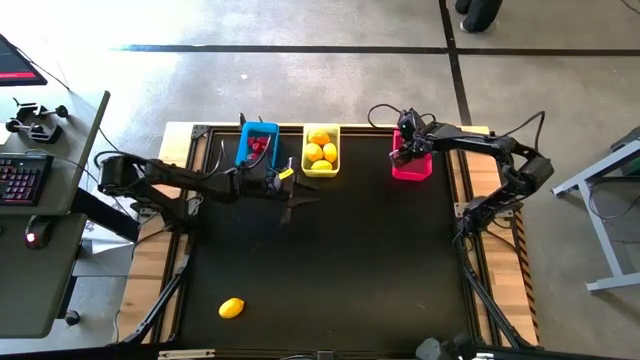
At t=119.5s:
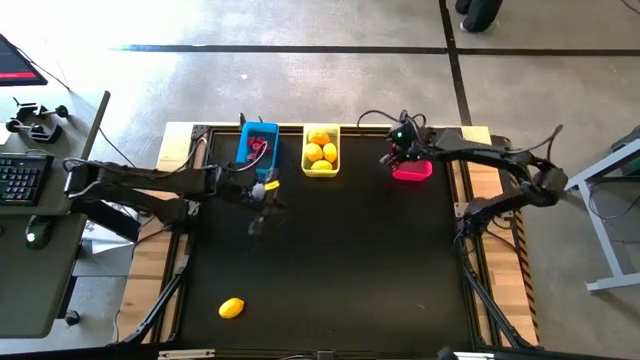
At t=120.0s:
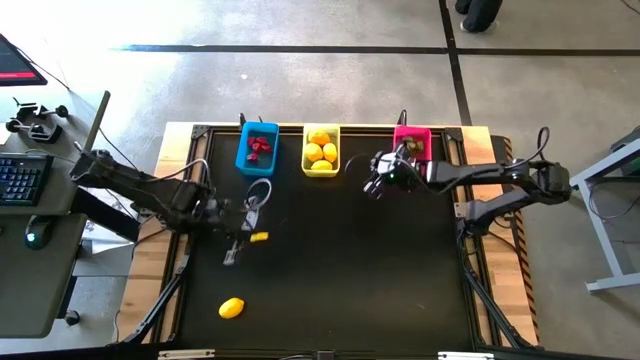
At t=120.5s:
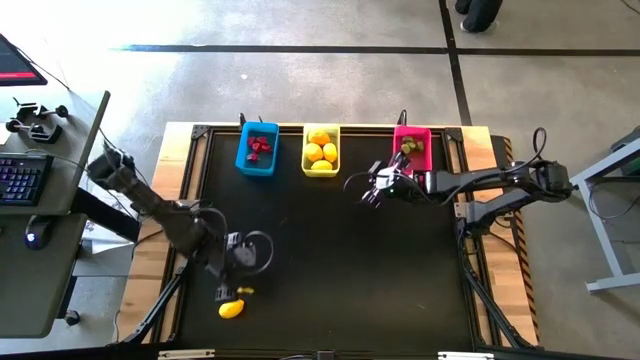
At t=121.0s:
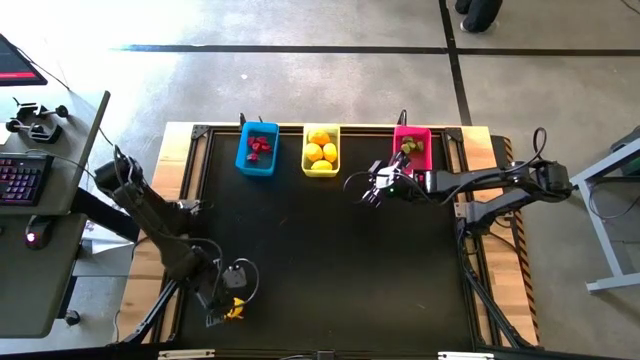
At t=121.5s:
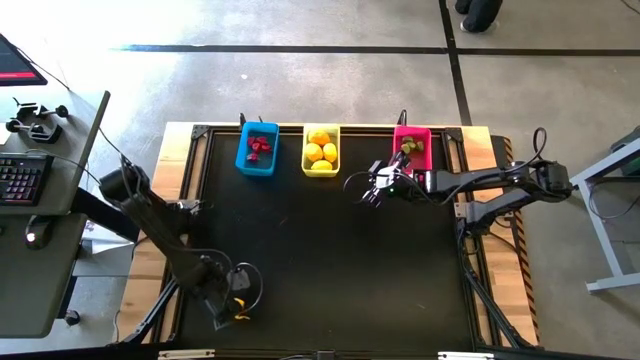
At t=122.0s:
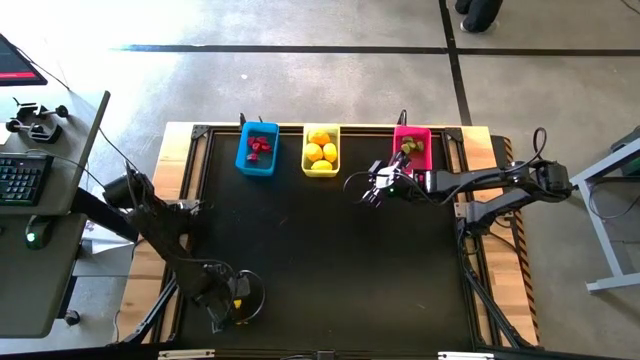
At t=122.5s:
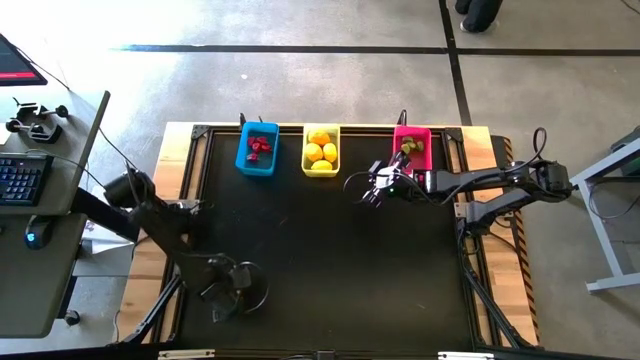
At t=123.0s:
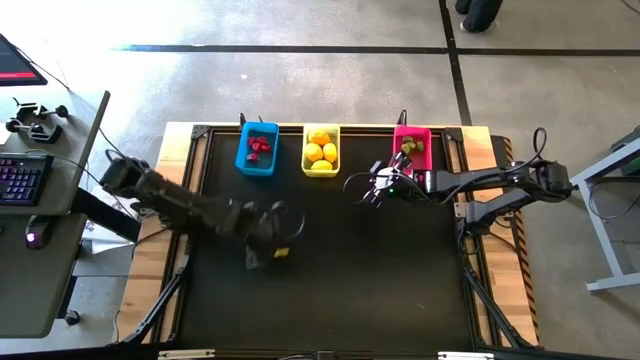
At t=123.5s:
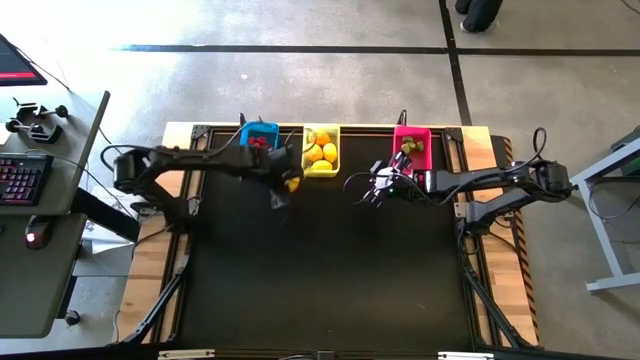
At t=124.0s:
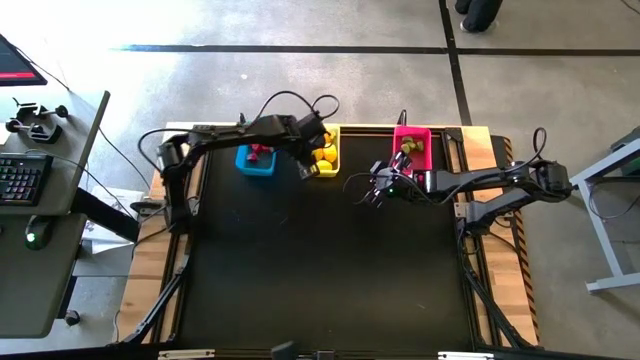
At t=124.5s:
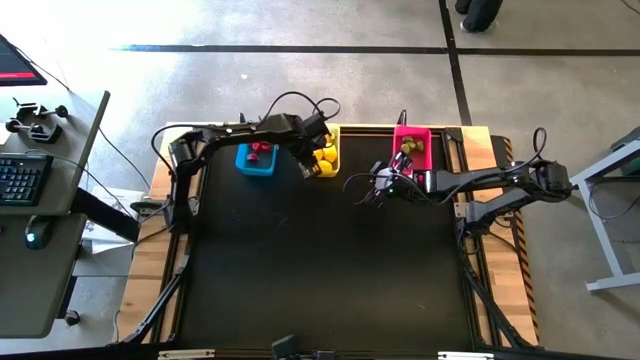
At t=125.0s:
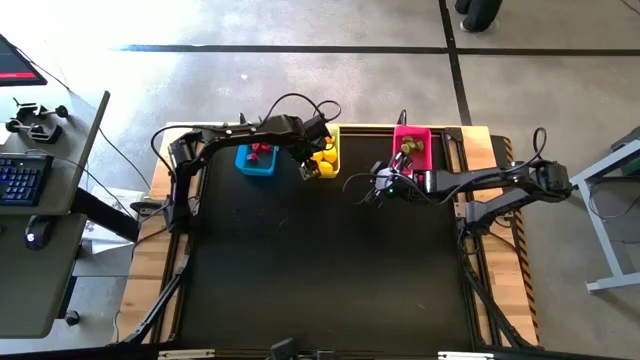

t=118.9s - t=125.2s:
Task: Sort produce into baskets
Put the yellow lemon into the yellow bin

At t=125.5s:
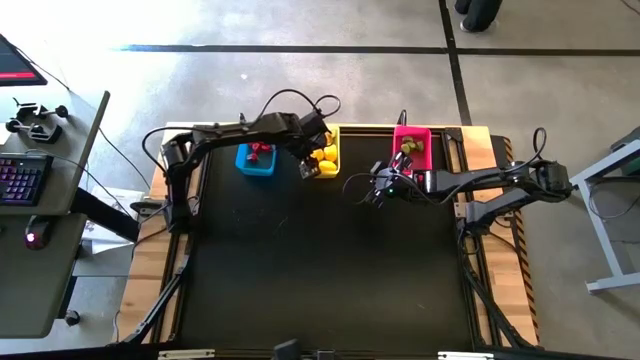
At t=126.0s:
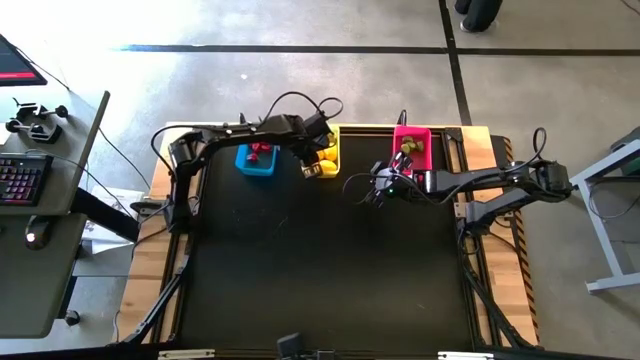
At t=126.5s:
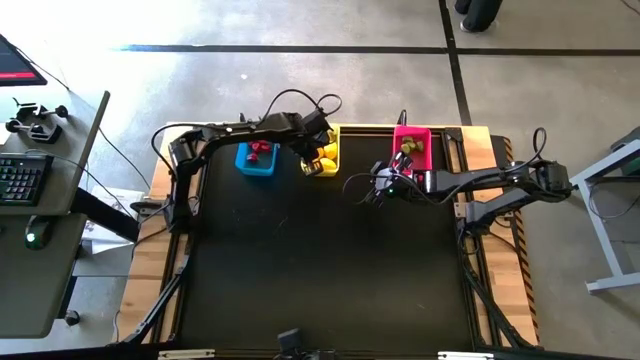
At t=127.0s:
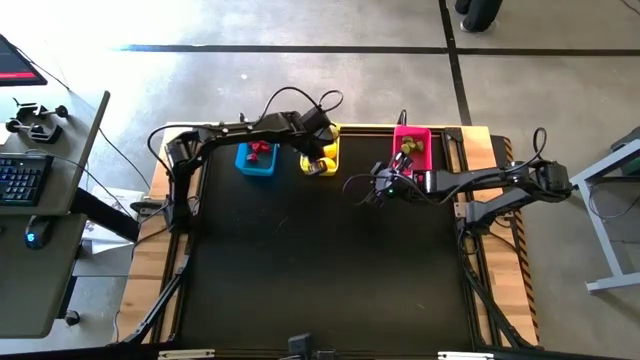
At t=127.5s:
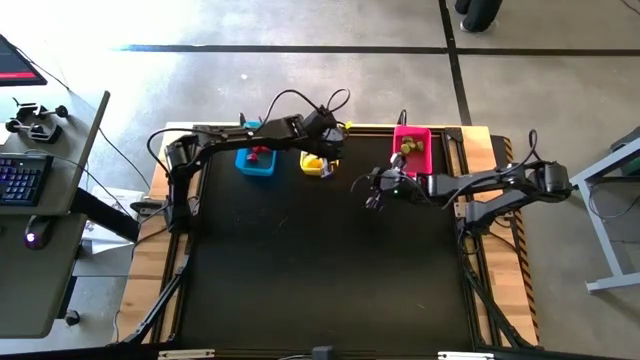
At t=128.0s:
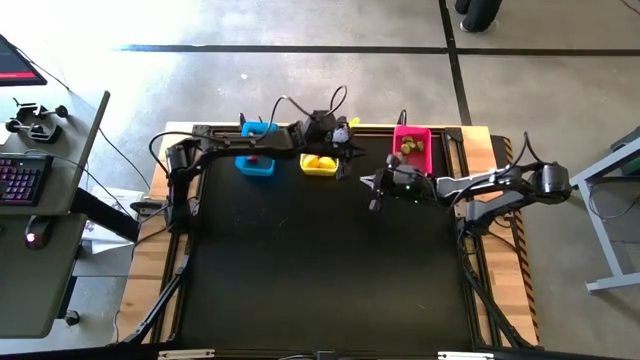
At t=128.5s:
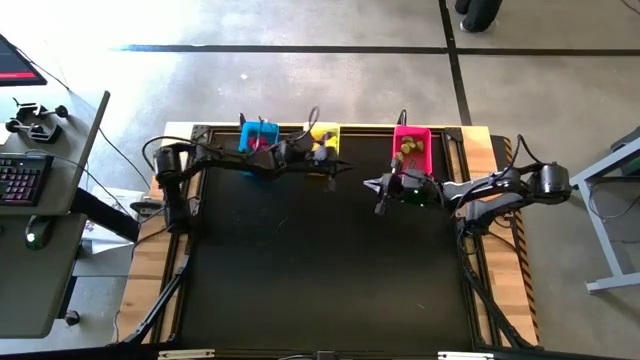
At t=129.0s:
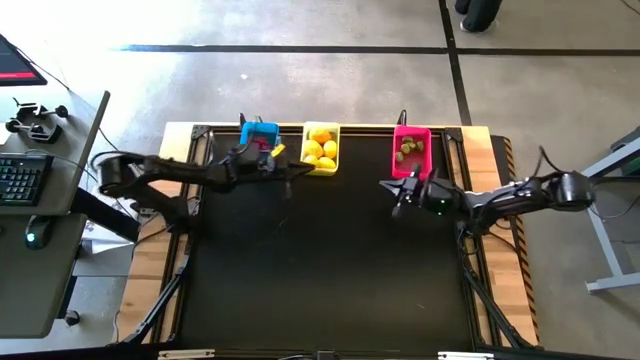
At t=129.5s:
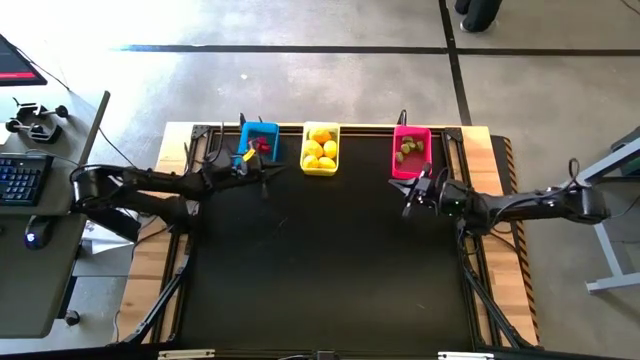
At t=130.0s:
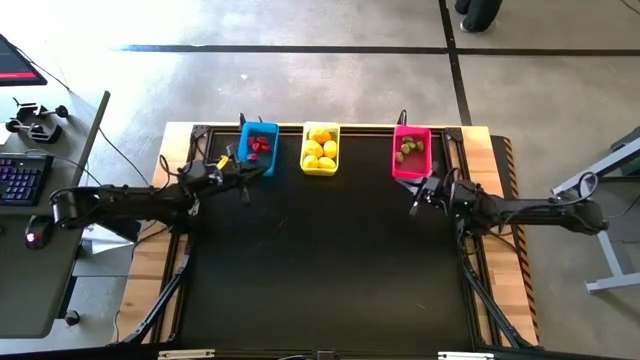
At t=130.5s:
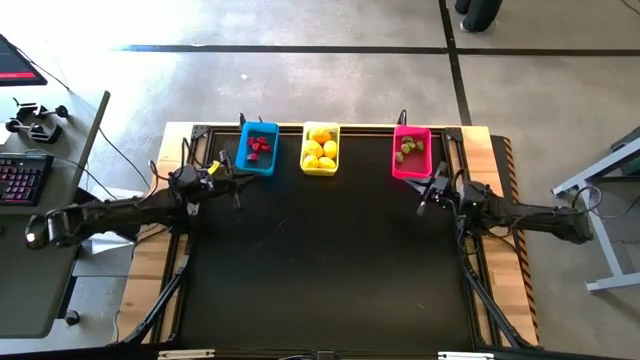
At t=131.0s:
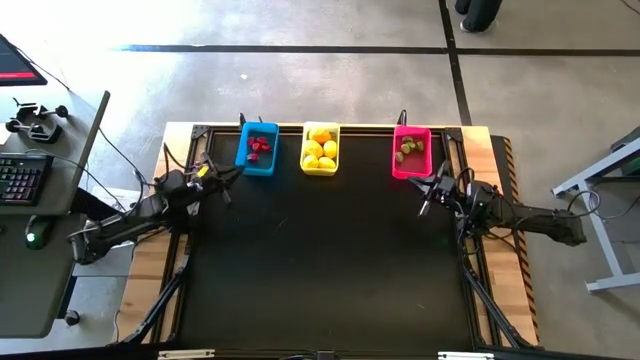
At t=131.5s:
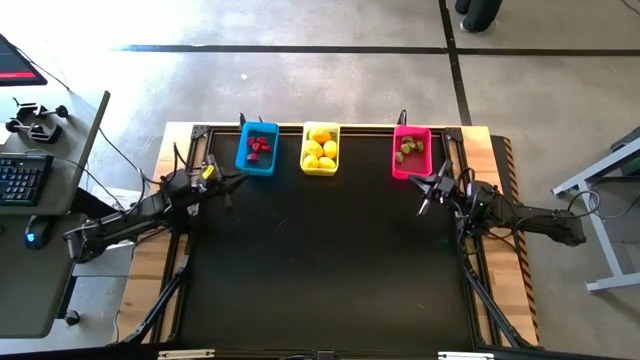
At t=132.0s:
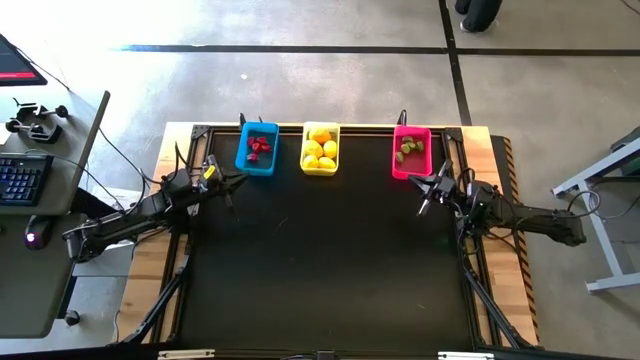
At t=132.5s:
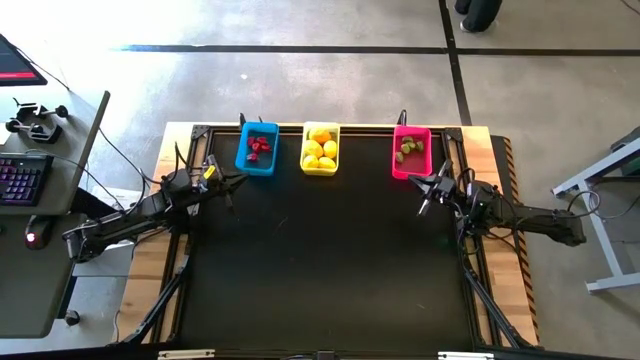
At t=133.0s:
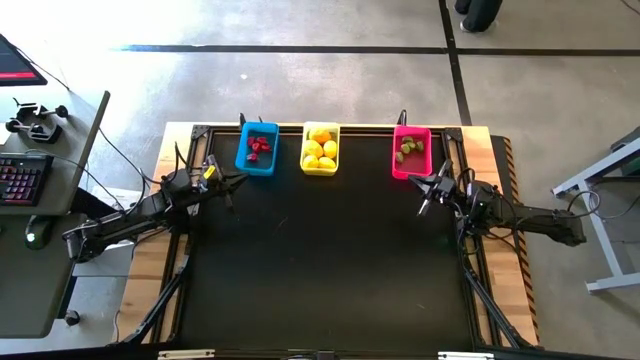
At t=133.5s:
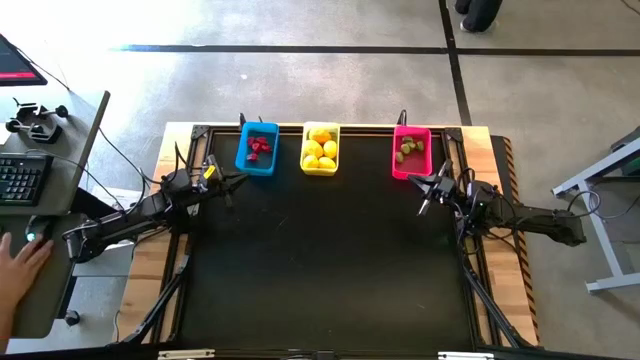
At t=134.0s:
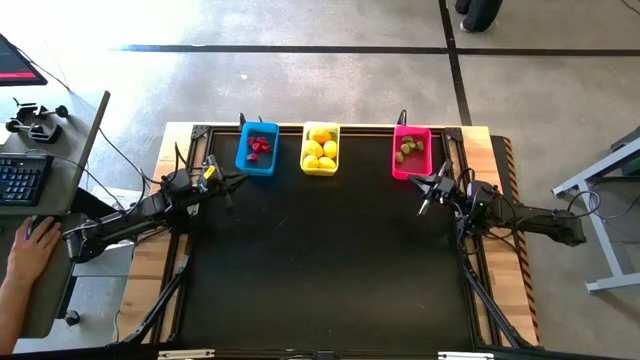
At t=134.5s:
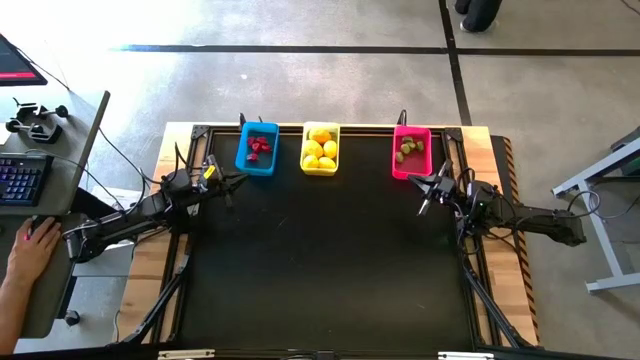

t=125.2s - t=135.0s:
Return to Home Position

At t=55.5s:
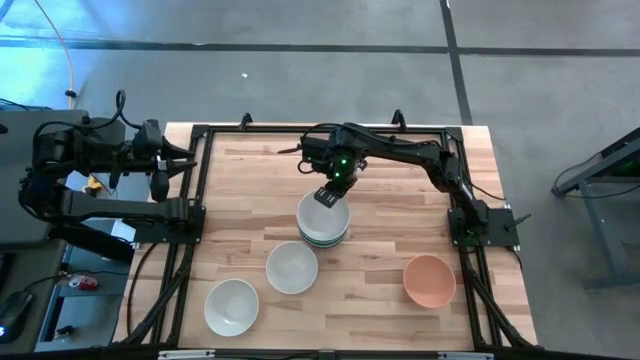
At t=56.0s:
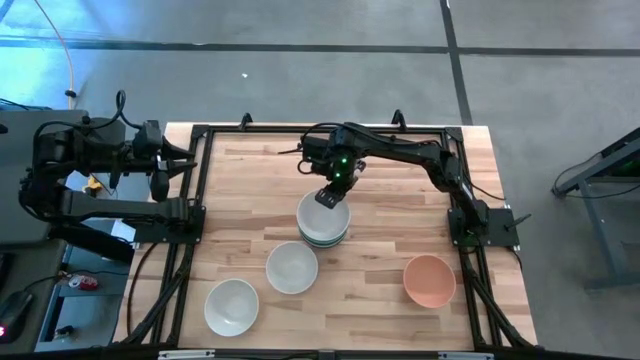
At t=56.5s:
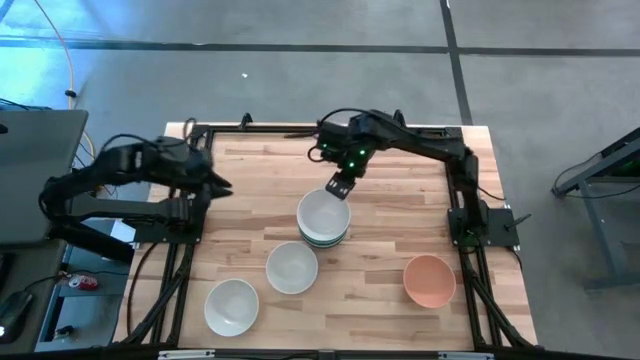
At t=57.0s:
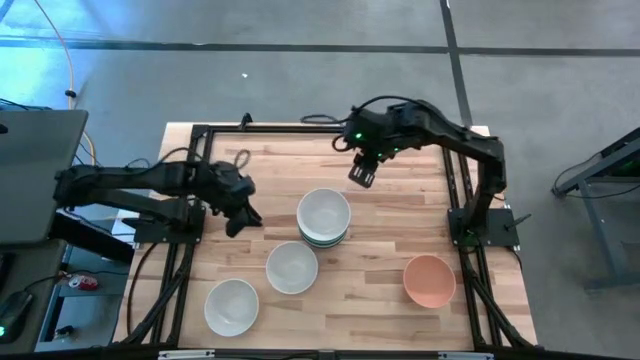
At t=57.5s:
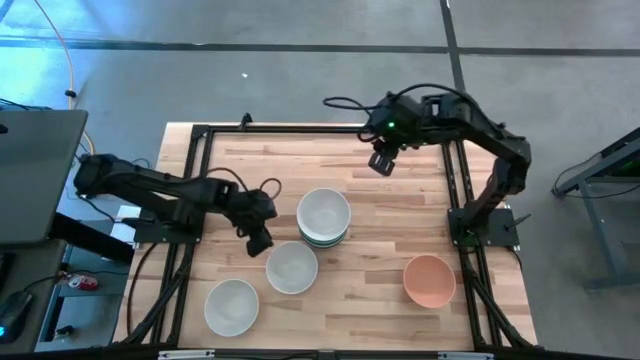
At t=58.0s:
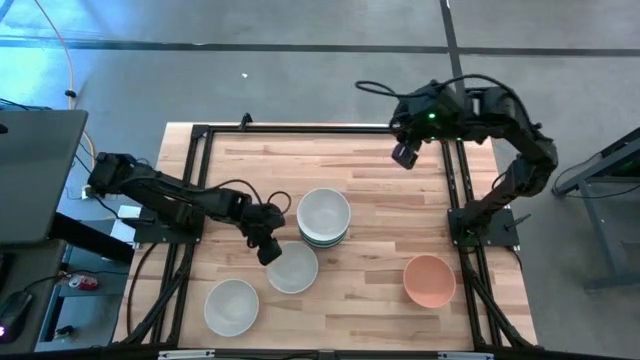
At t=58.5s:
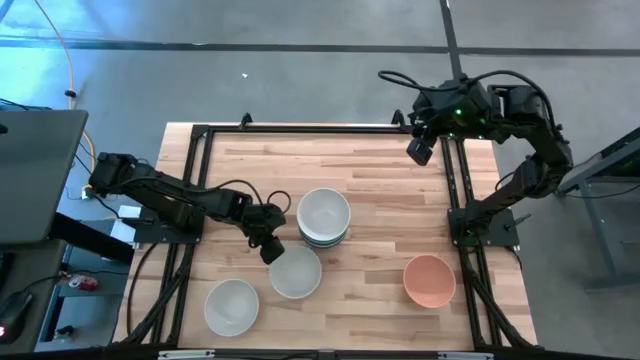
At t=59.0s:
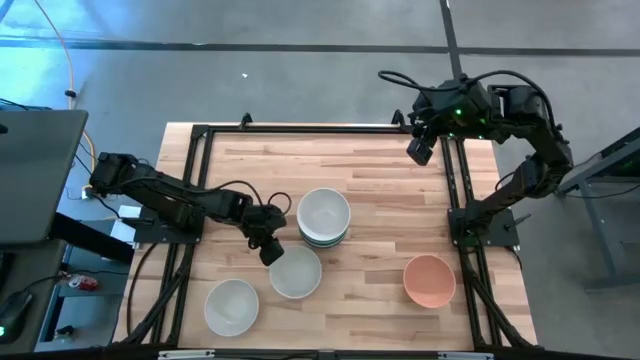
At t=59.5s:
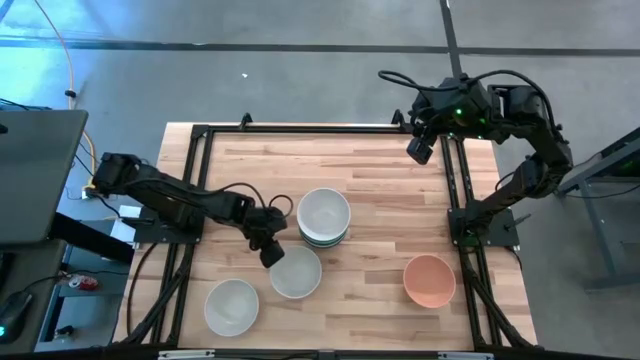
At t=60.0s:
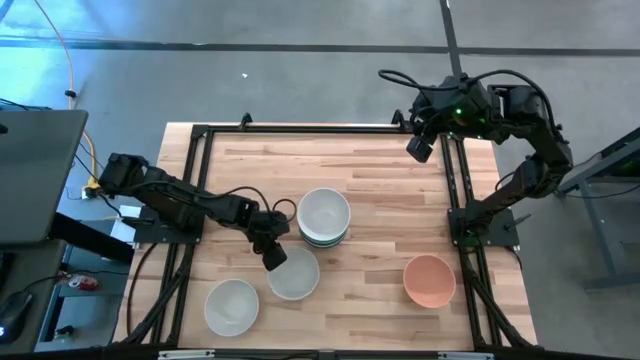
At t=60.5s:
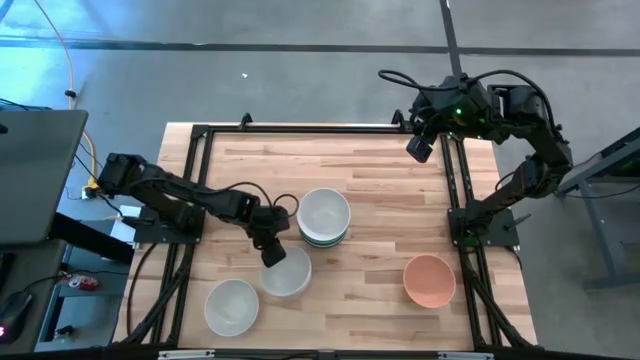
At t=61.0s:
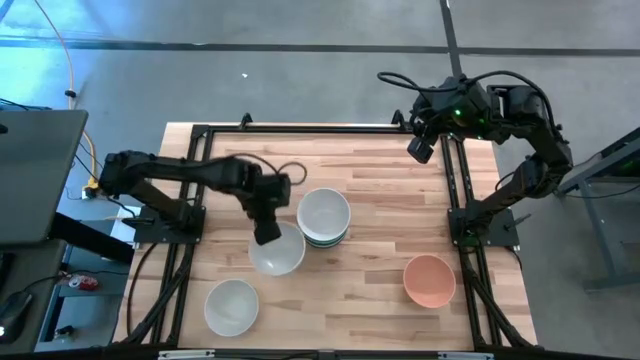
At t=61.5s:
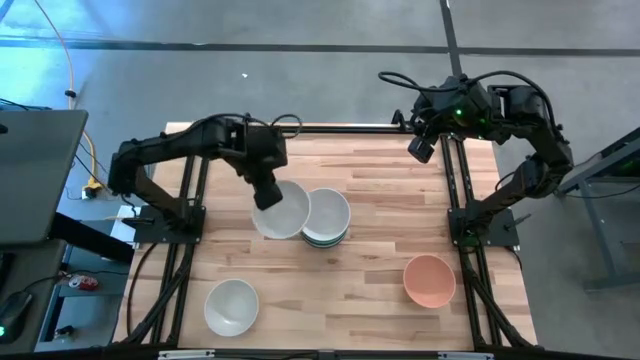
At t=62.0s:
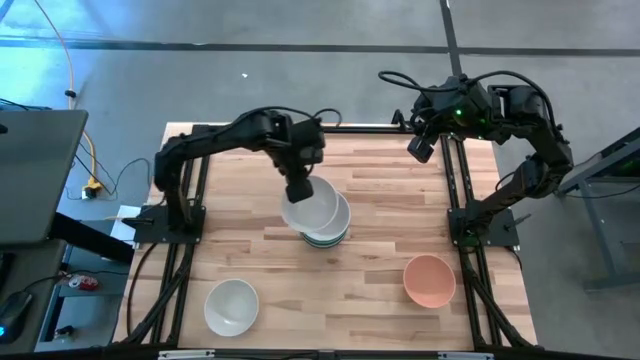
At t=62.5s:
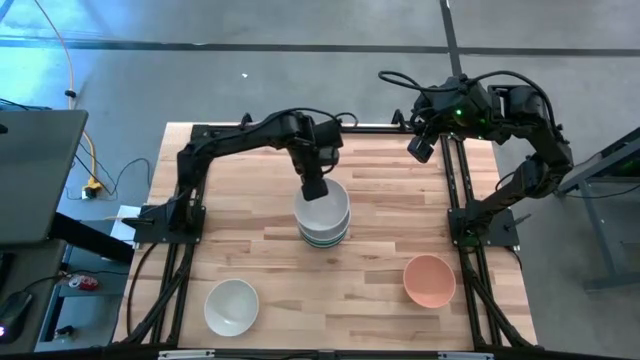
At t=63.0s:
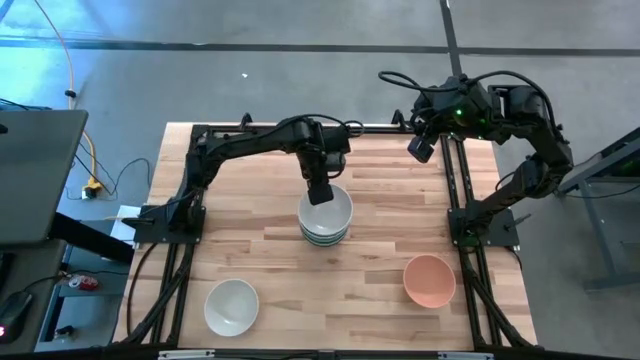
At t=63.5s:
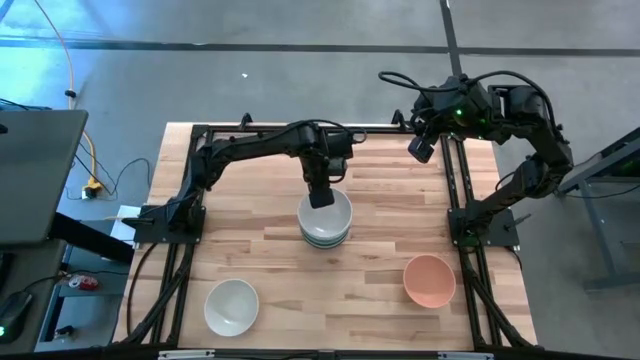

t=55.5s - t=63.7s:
Task: Nest bowls inside each other
Stack the top white bowl on top of the white bowl
